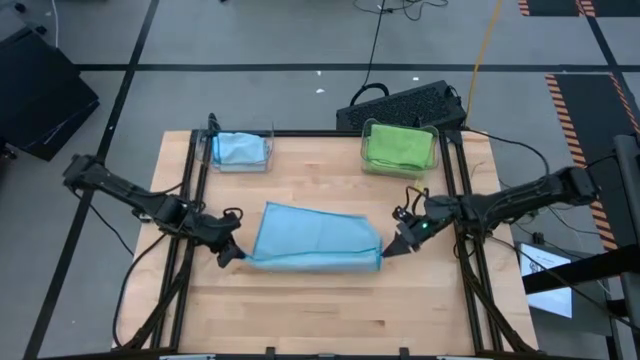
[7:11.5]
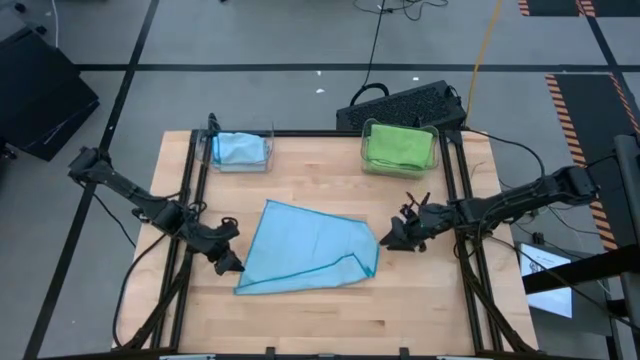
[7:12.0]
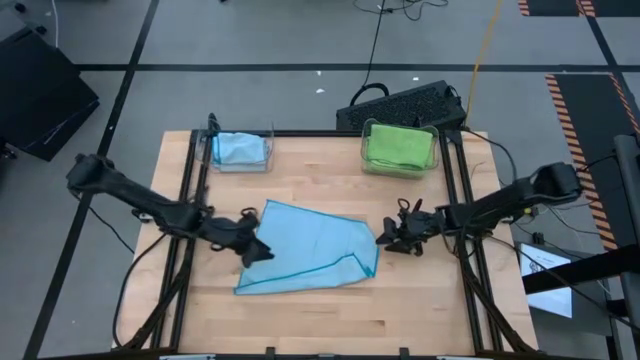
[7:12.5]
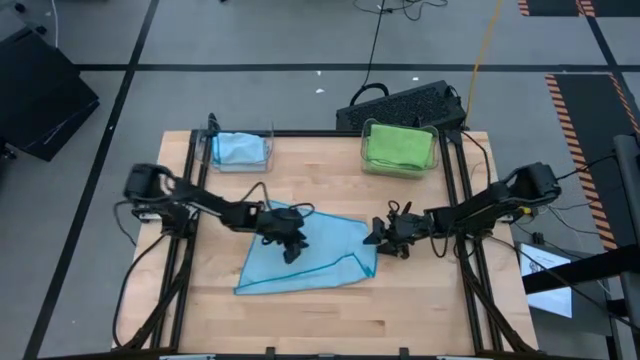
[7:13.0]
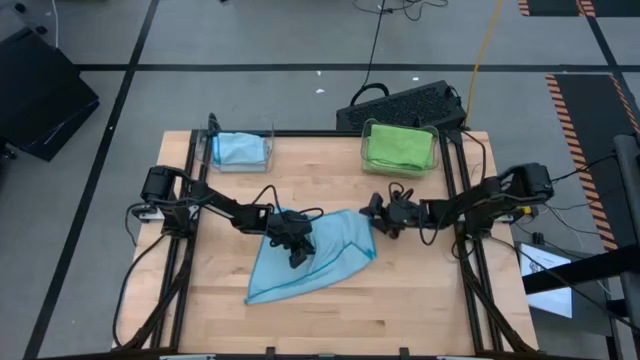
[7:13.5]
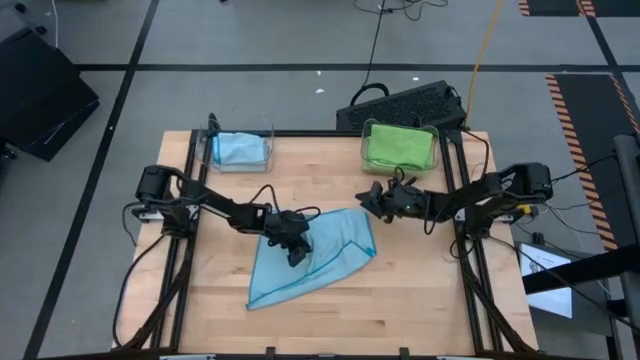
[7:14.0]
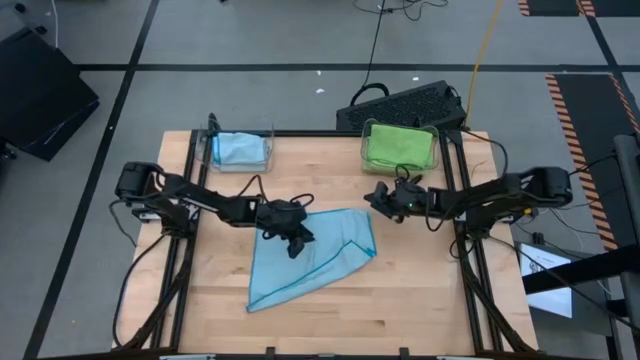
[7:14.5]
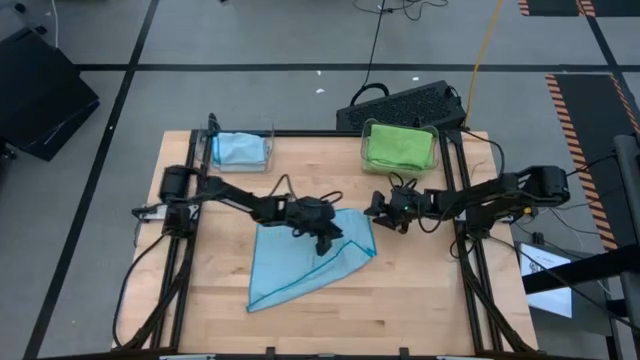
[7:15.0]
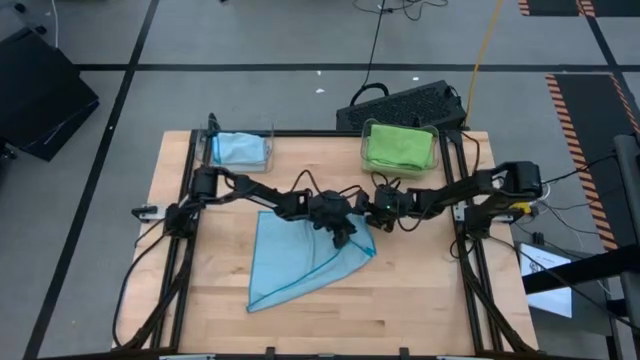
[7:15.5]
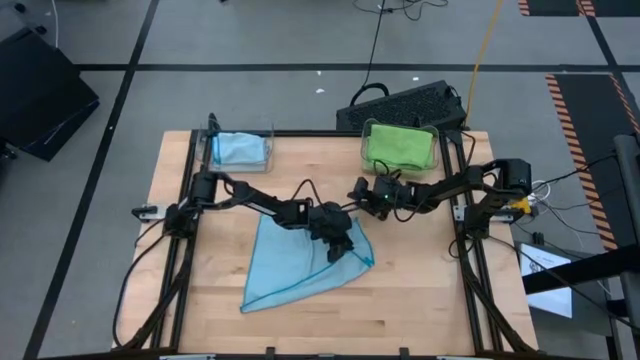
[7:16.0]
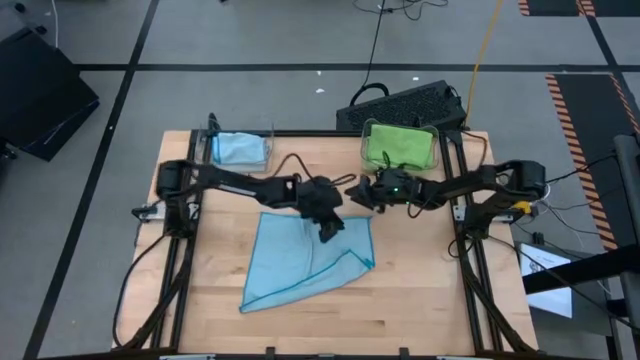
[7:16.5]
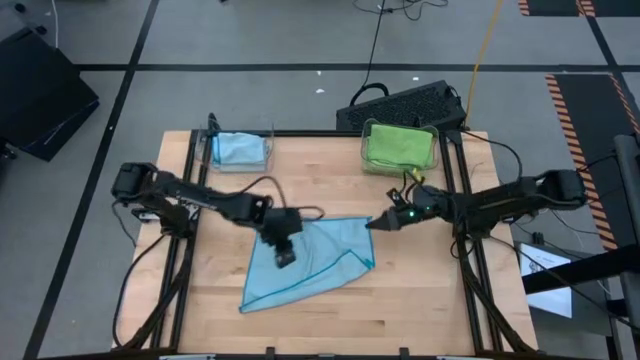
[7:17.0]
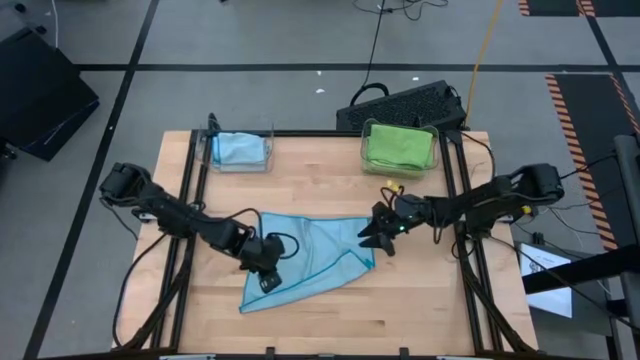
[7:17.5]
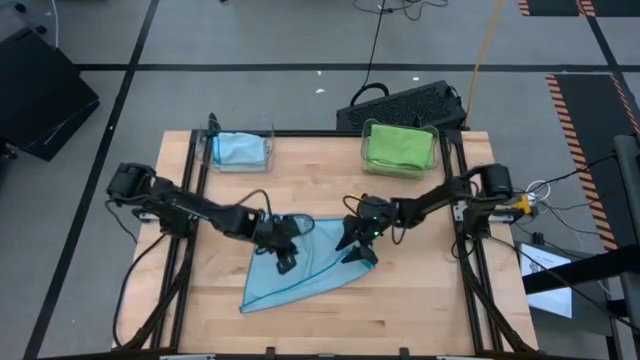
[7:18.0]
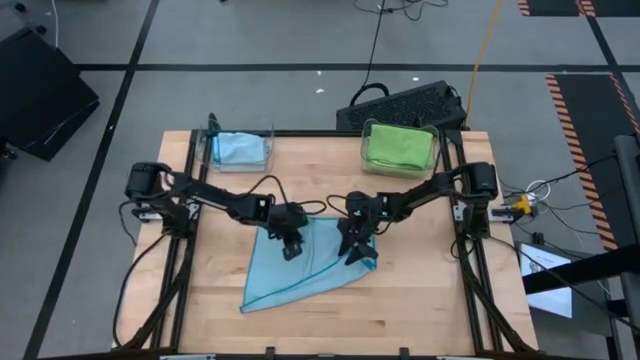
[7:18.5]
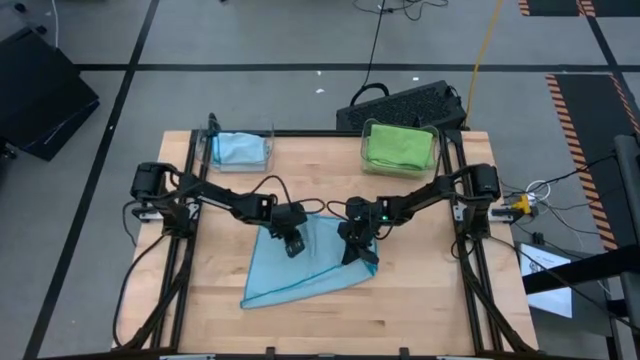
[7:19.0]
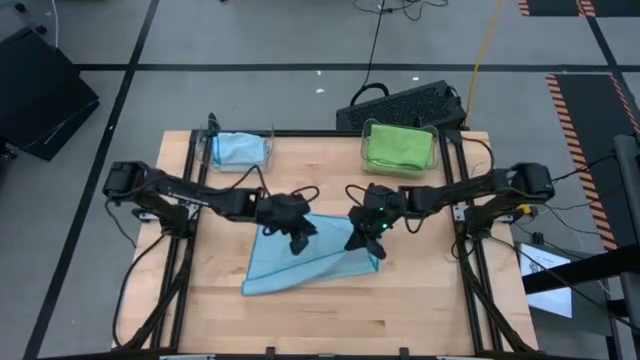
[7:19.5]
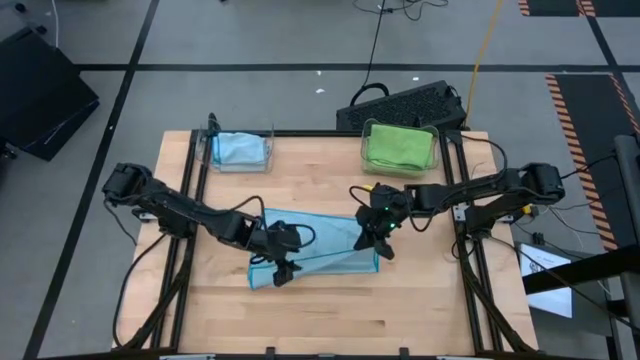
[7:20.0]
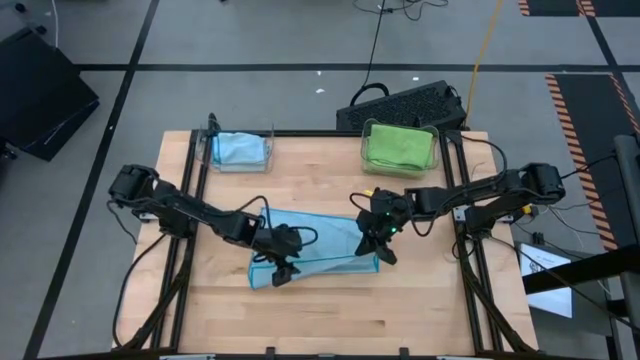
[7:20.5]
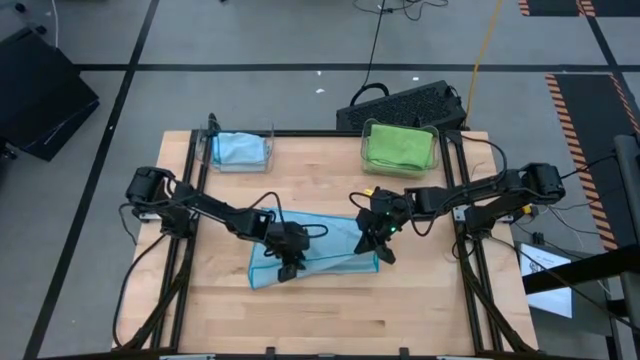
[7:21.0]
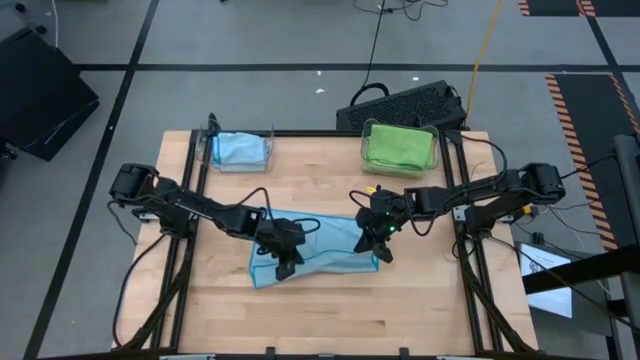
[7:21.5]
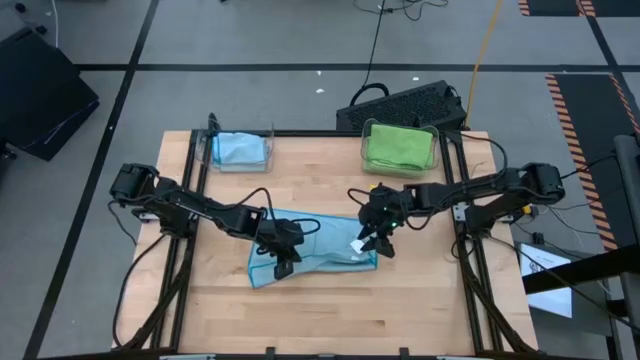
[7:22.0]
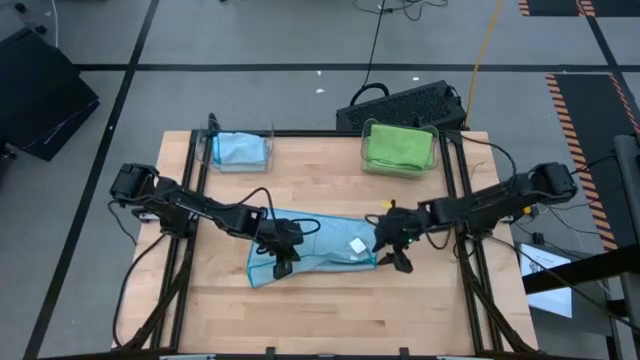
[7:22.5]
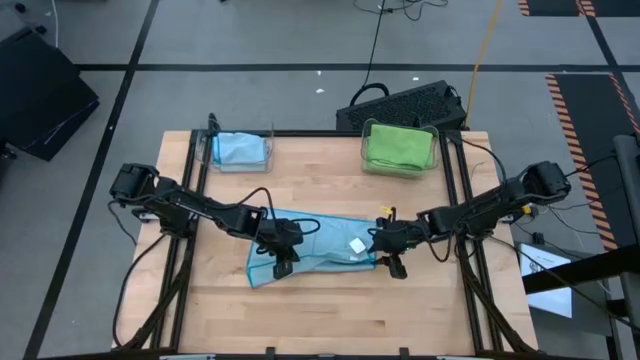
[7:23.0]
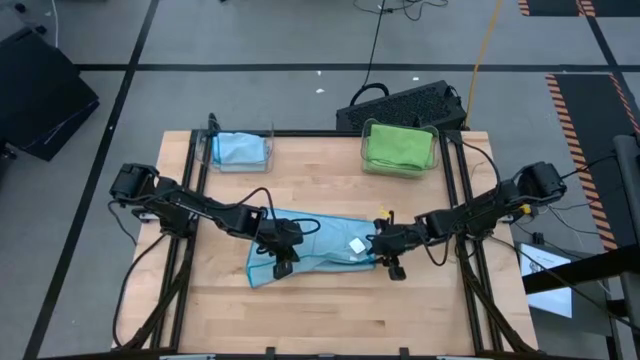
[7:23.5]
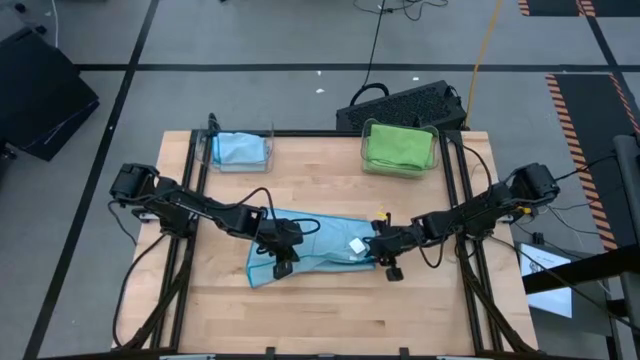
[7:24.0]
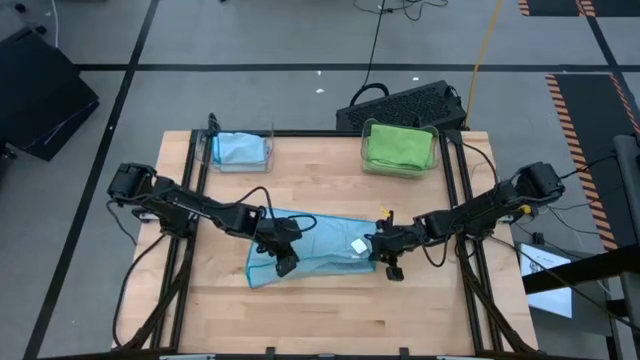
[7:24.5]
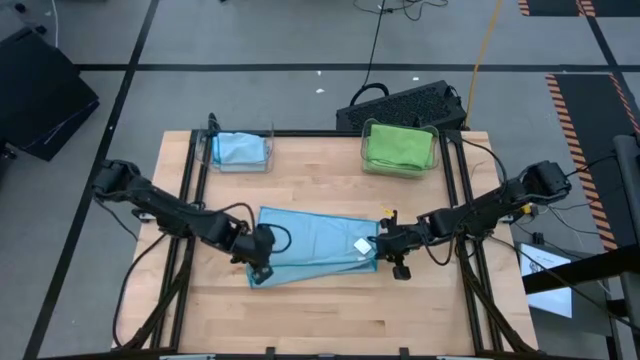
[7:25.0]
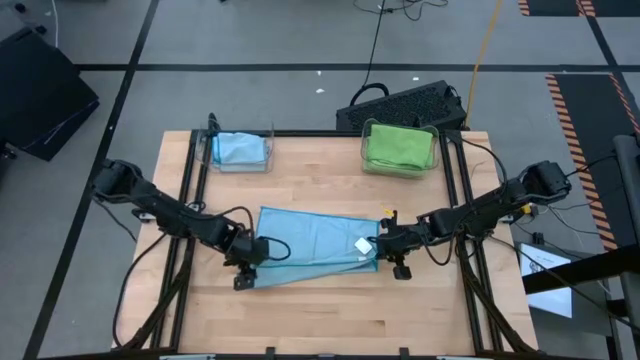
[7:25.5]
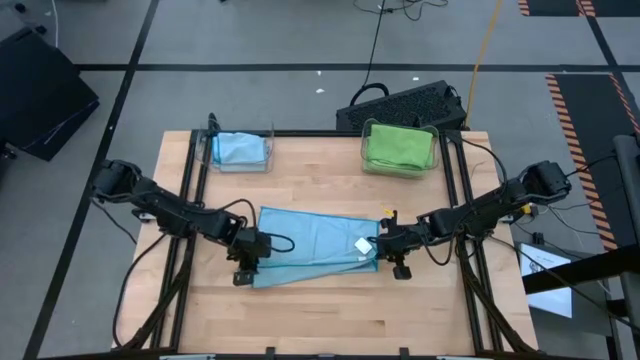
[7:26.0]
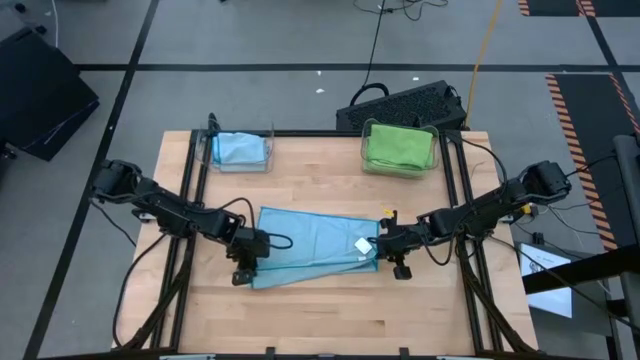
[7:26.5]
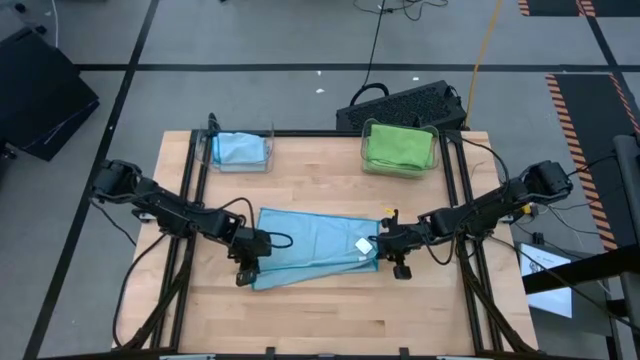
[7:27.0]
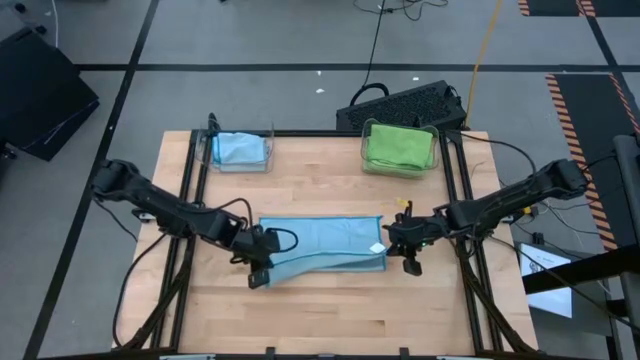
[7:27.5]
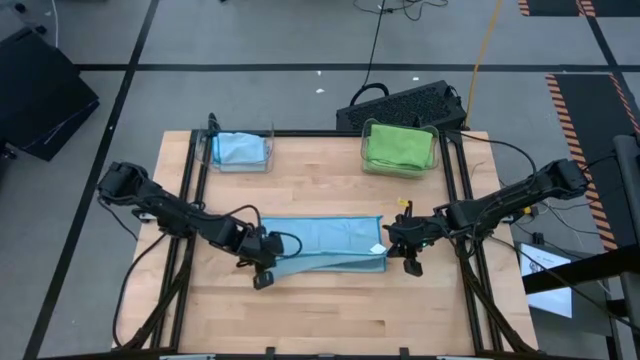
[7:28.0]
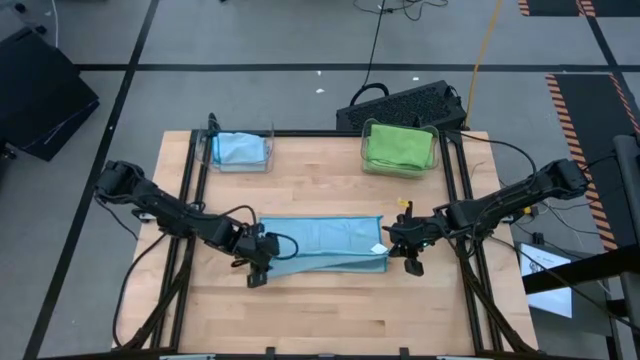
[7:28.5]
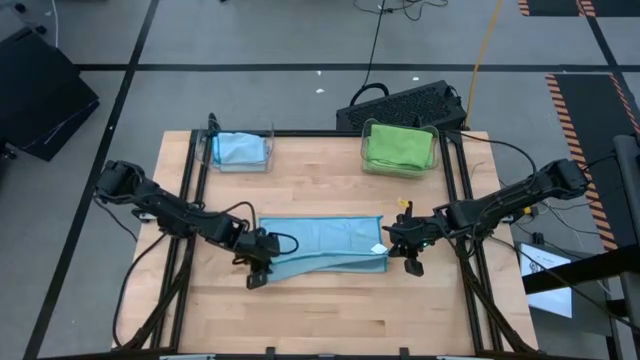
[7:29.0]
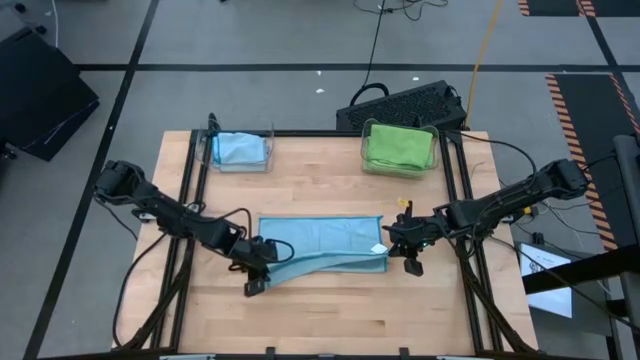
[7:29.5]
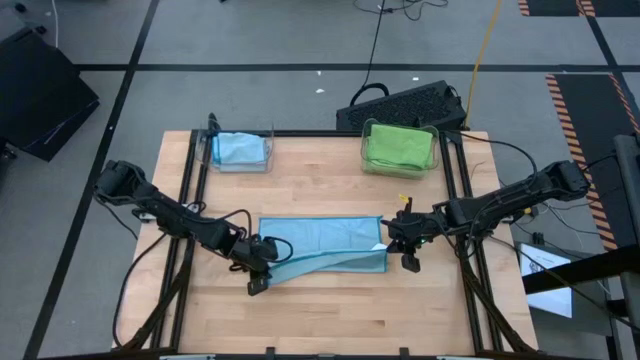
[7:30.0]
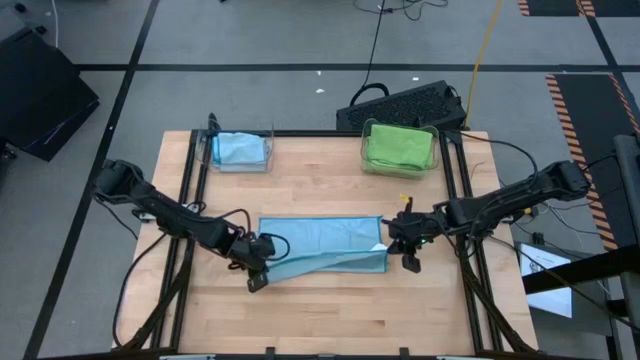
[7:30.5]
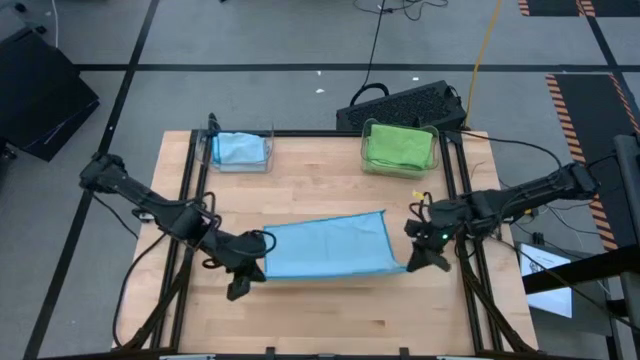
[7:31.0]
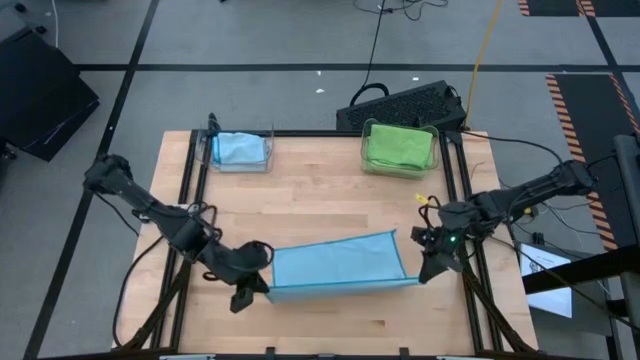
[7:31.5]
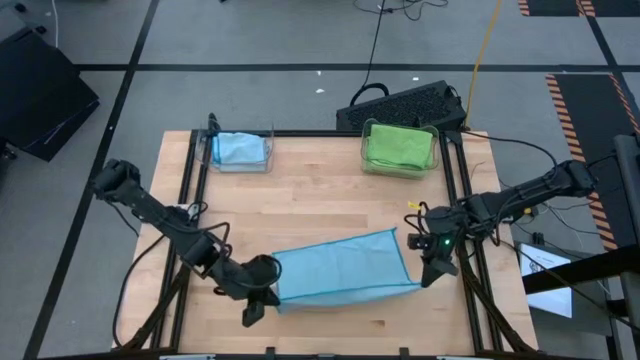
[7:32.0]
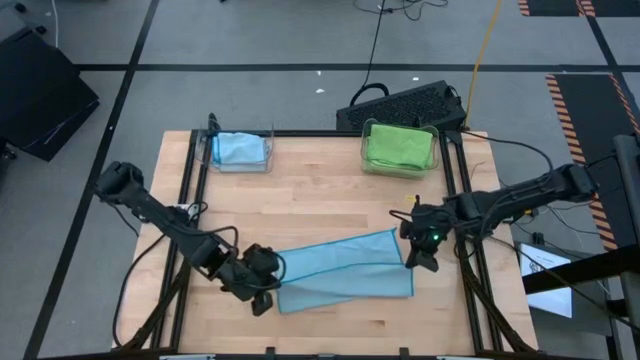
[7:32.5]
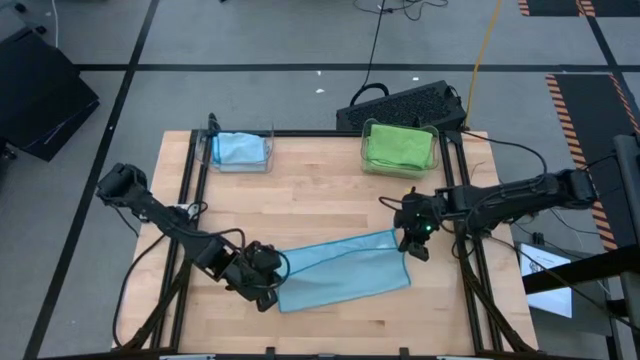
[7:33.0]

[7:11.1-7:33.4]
Task: Sort microfiber towel by color & place in baskets
Fold the blue towel
